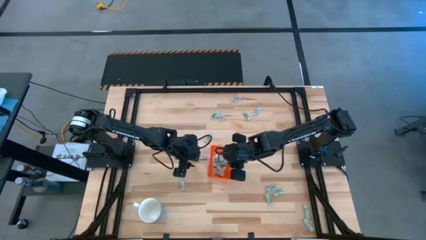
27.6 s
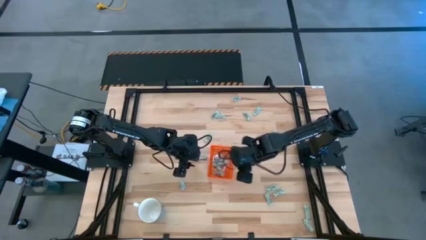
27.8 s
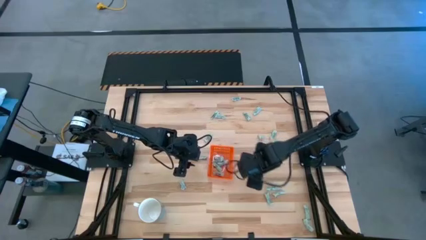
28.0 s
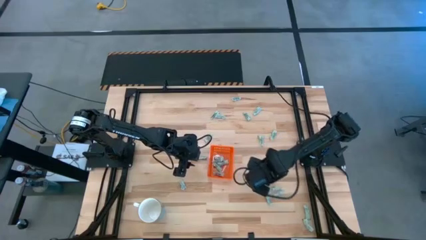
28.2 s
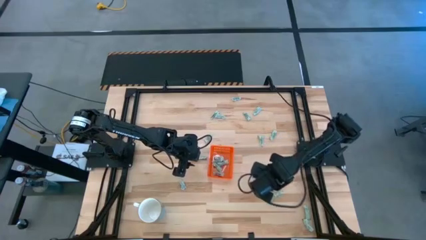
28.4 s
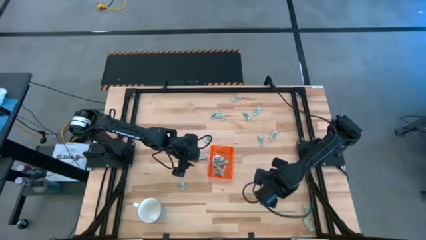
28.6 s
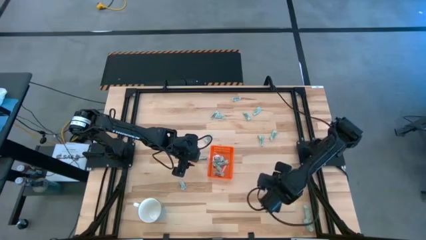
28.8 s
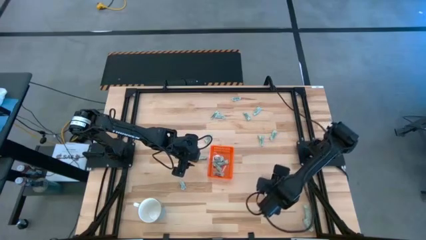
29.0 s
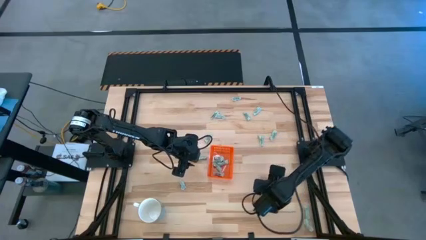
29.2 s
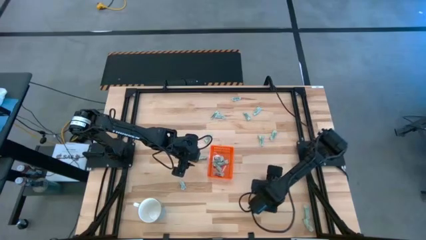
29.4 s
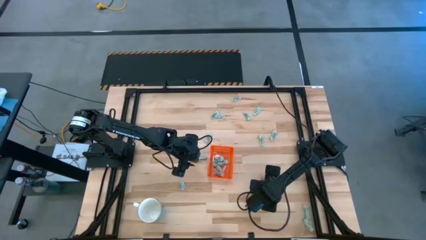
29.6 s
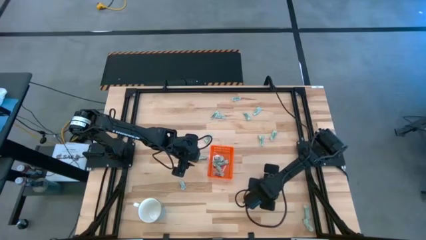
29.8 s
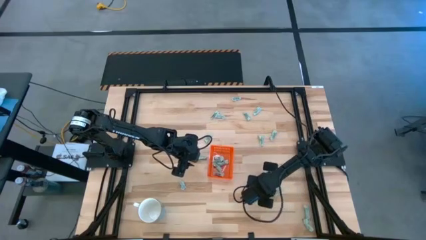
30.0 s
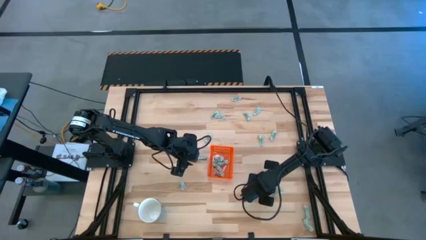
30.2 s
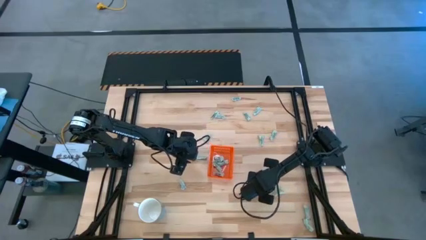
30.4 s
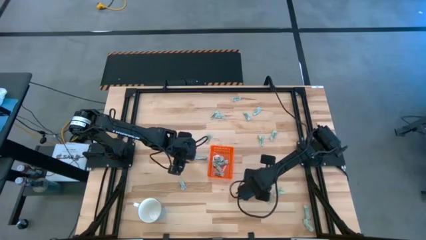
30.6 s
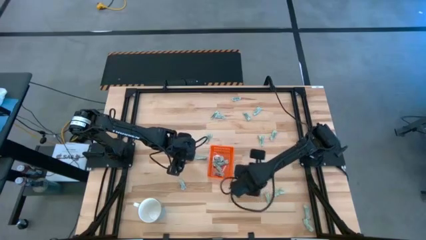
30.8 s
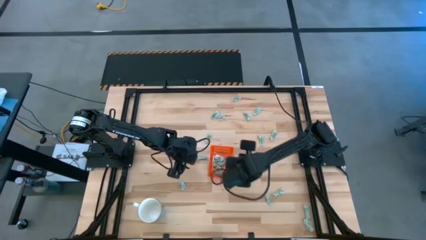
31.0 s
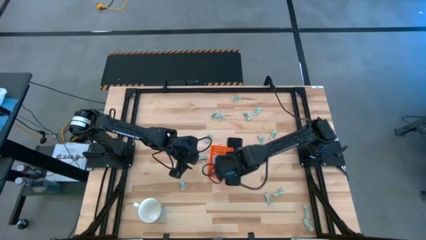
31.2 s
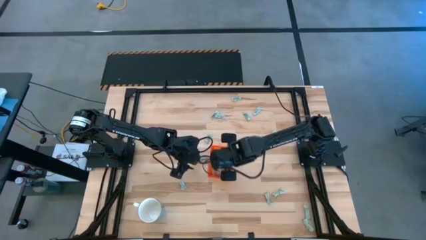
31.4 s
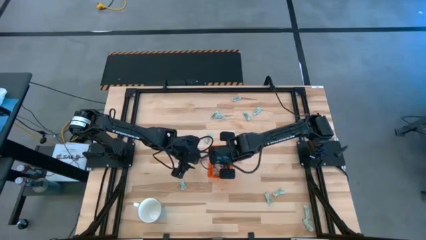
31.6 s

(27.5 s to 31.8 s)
Task: Pick and place Stevia / Truvia into bins
Put the stevia packet into the orange bin

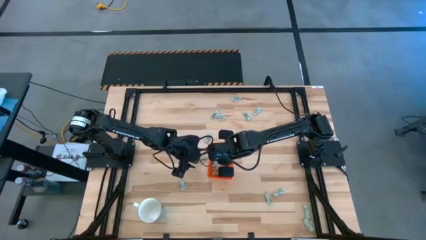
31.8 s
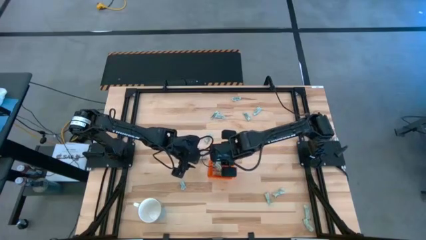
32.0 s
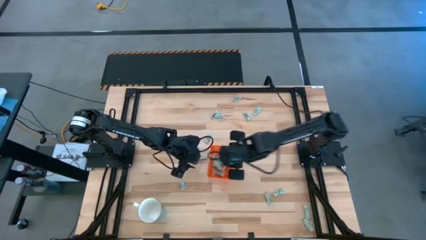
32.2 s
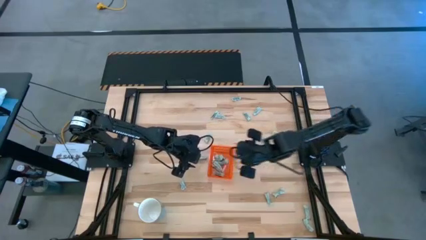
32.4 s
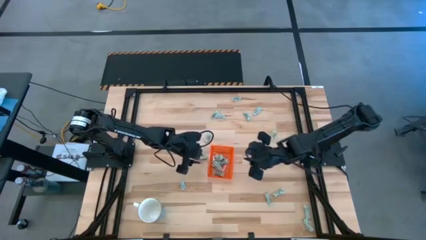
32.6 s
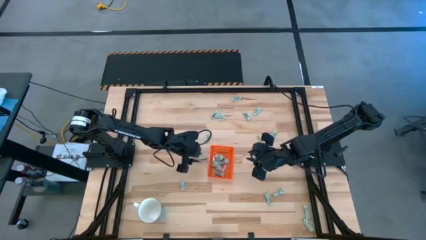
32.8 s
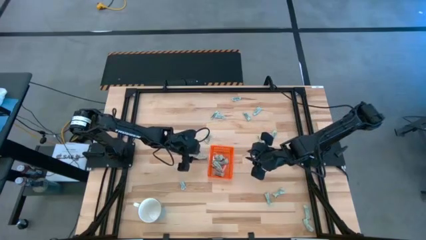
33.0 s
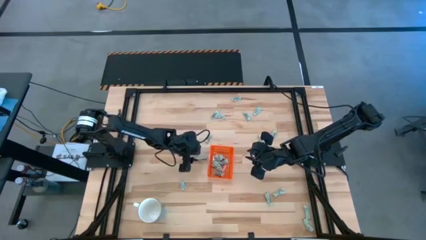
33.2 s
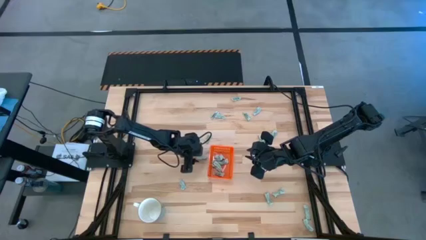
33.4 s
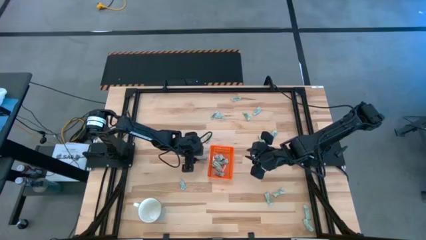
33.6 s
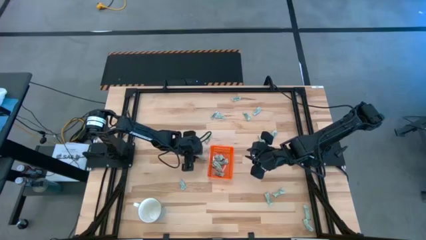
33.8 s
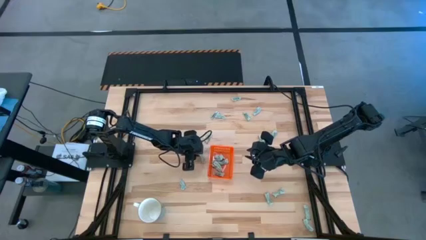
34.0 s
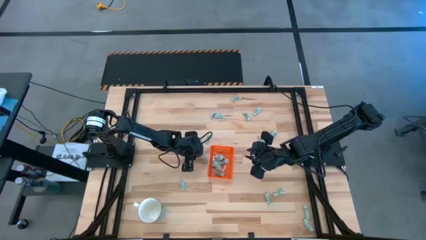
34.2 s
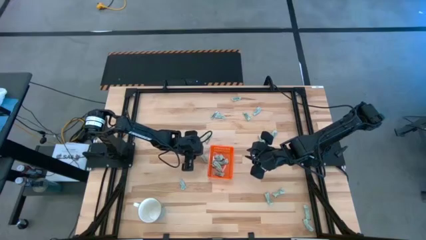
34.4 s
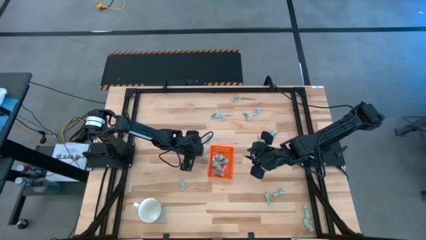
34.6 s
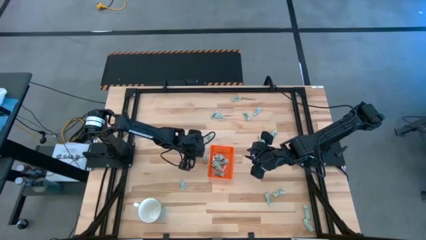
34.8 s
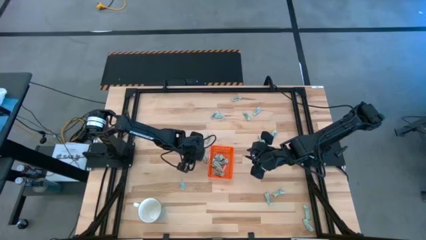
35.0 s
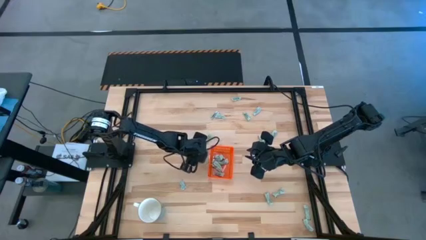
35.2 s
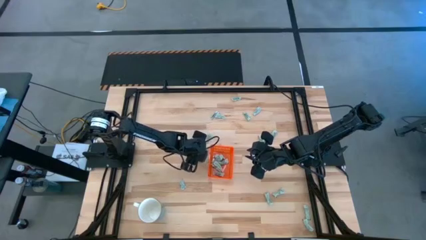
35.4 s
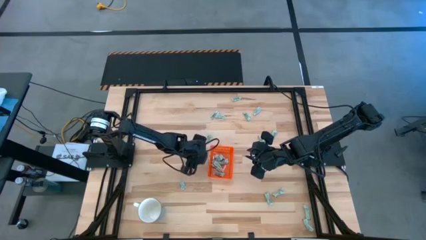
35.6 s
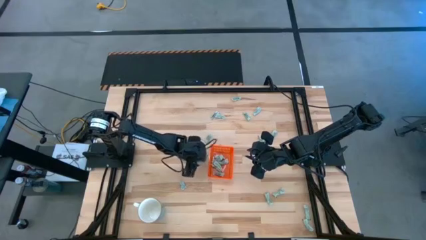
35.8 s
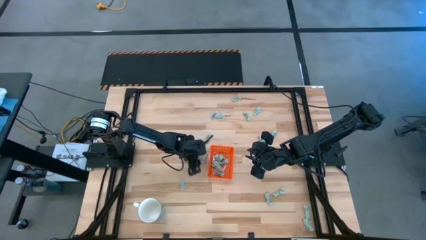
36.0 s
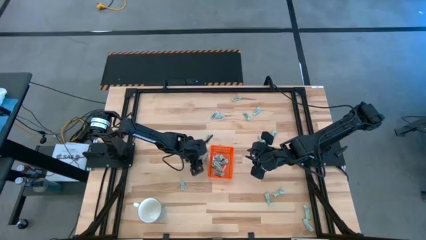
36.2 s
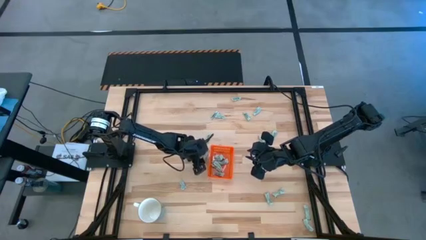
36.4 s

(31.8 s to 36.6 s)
Put the stevia packet into the orange bin

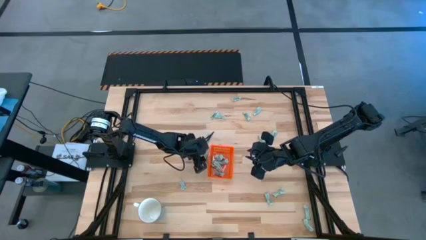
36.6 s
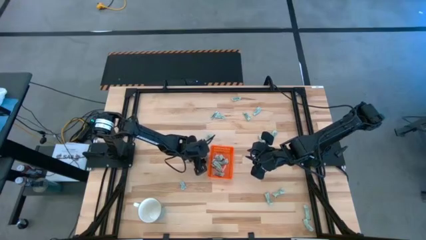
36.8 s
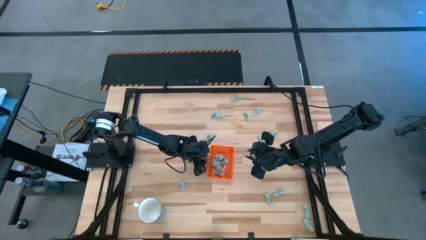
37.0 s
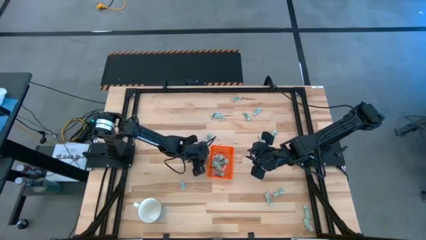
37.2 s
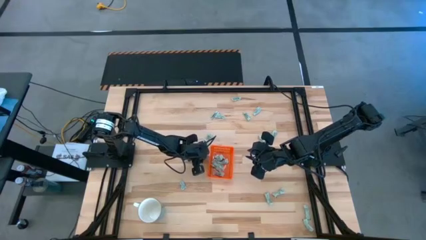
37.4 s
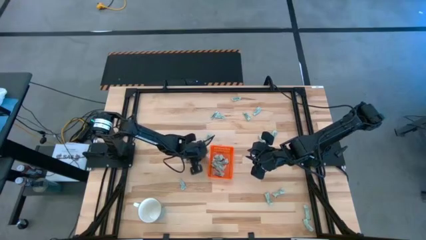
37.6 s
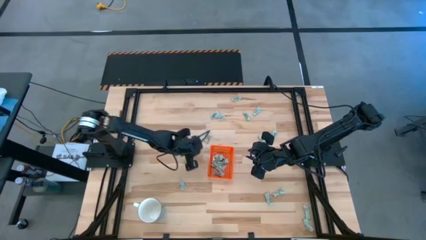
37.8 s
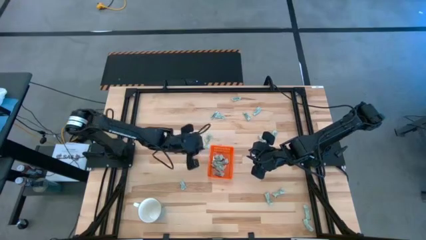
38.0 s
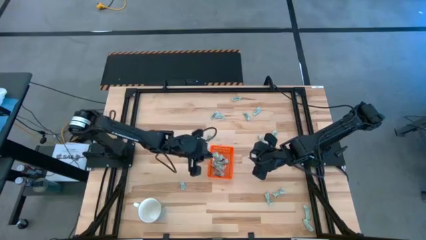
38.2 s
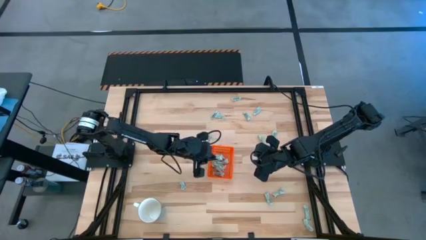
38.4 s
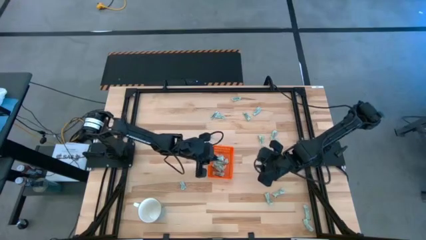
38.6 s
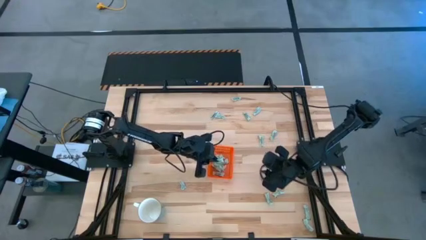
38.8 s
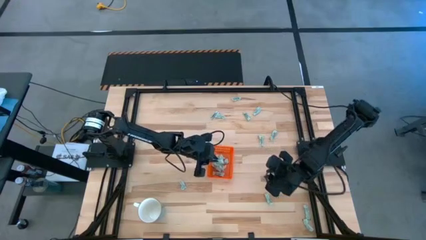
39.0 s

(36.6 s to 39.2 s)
Put the stevia packet into the orange bin

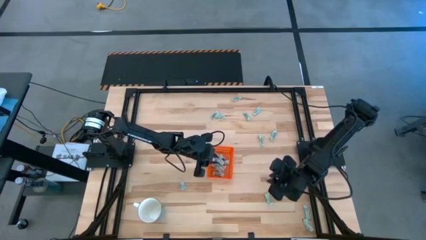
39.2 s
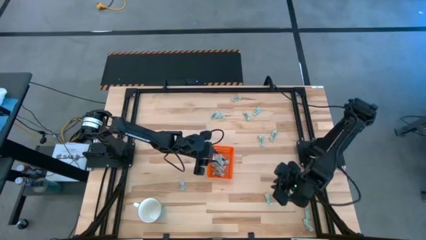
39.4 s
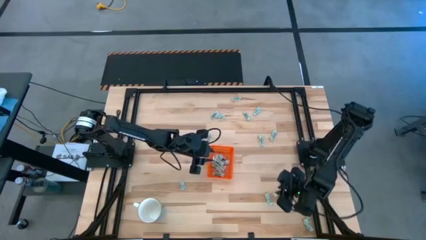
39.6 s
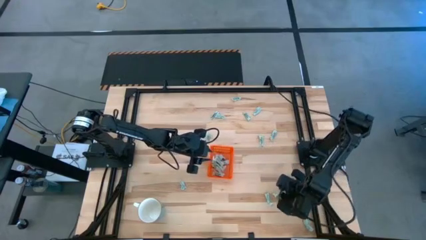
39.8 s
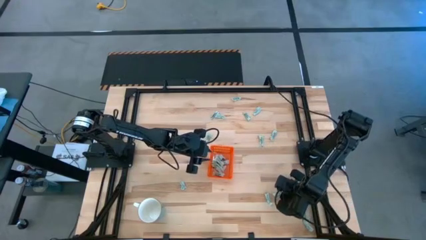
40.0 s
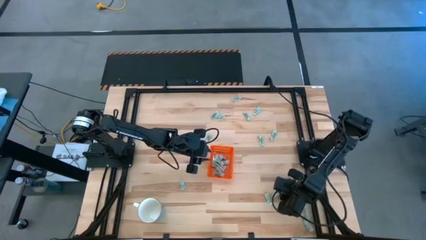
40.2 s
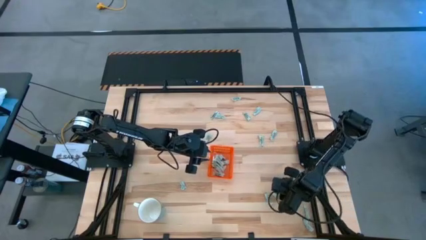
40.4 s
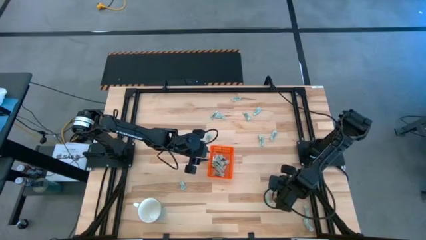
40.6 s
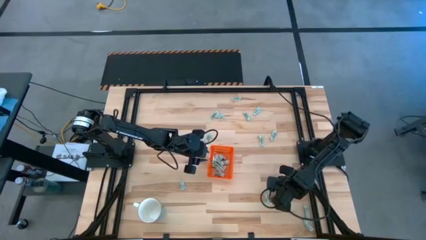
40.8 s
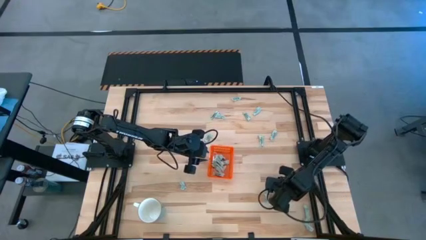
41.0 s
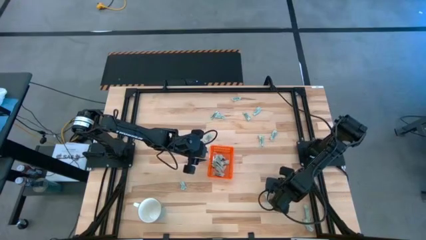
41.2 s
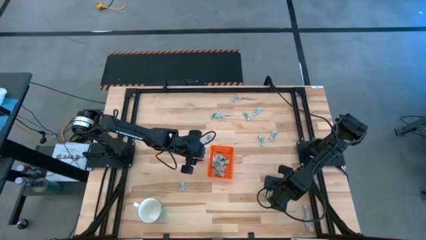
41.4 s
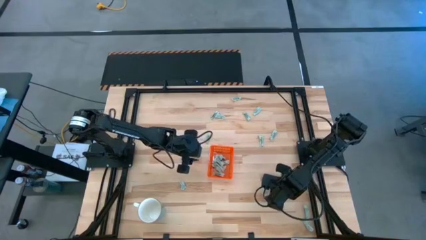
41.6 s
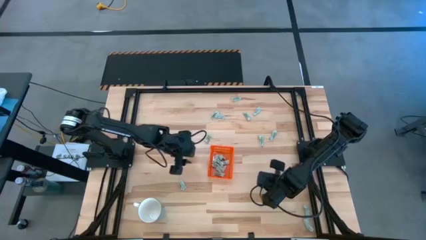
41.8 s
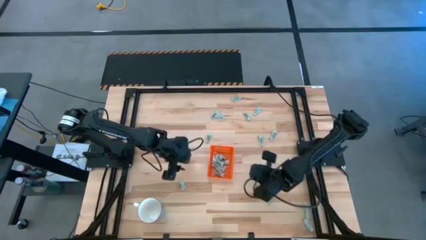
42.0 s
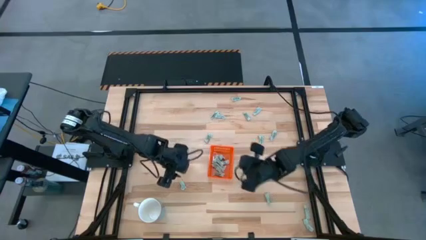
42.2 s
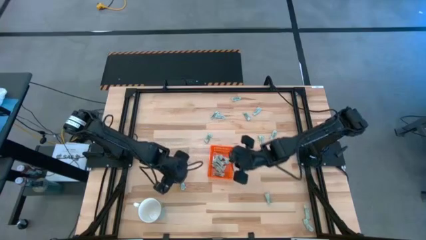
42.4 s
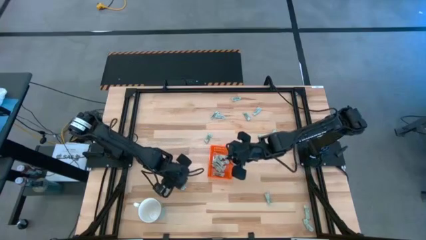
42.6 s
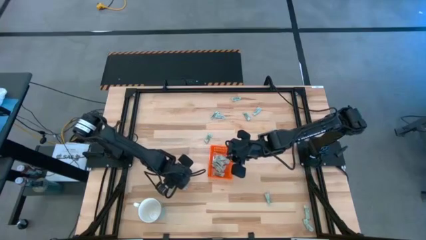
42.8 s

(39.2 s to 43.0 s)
Put the stevia packet into the orange bin

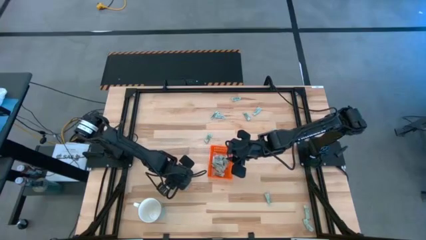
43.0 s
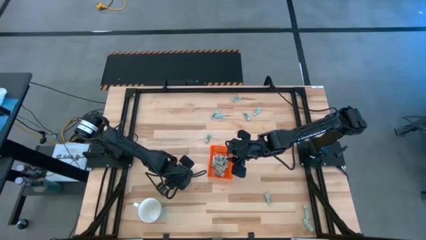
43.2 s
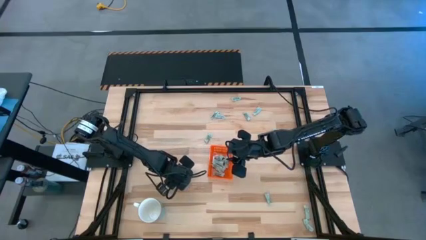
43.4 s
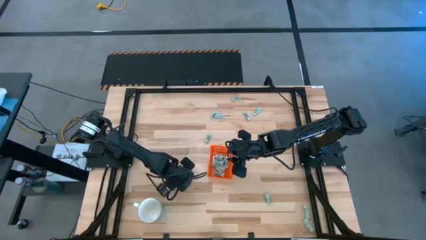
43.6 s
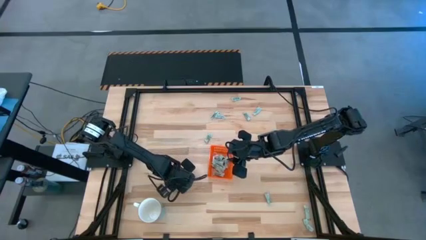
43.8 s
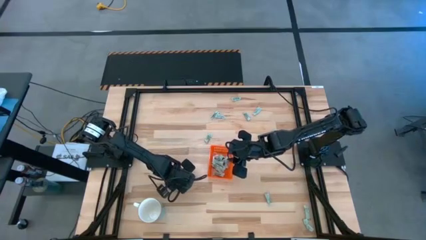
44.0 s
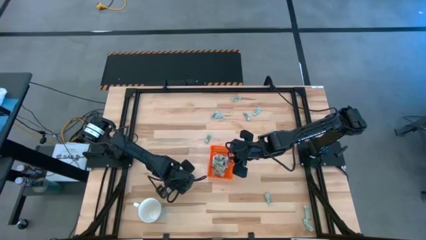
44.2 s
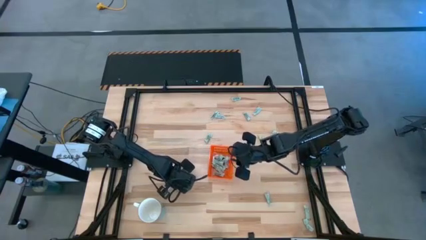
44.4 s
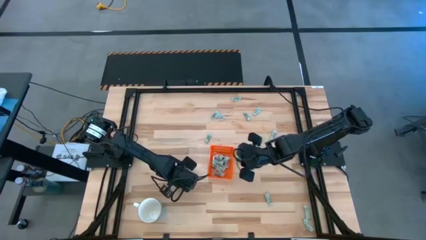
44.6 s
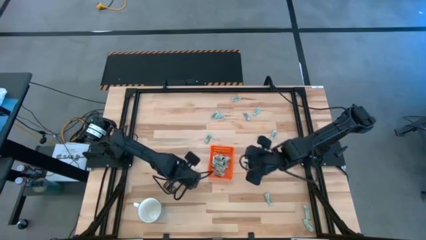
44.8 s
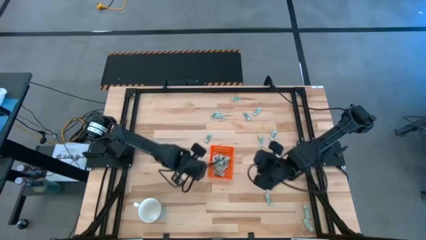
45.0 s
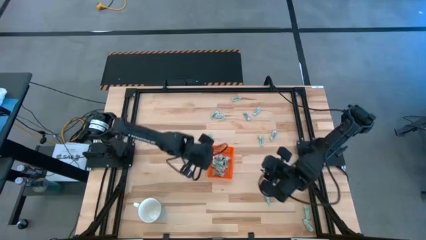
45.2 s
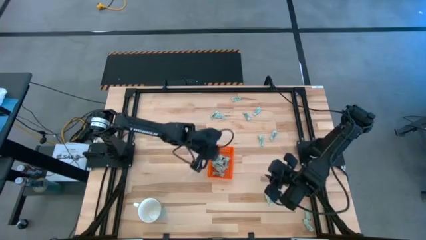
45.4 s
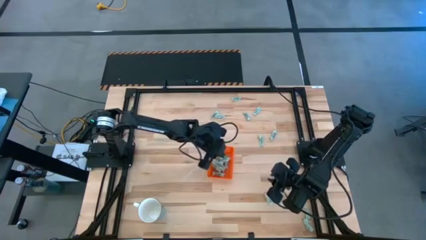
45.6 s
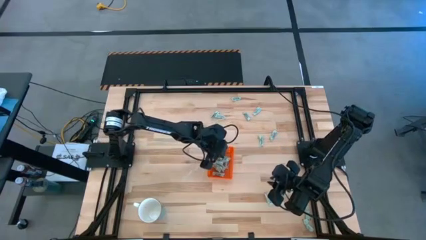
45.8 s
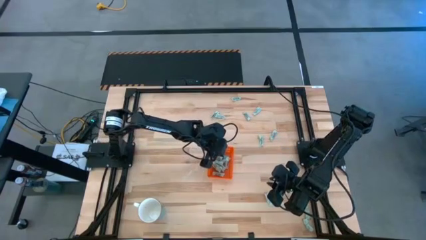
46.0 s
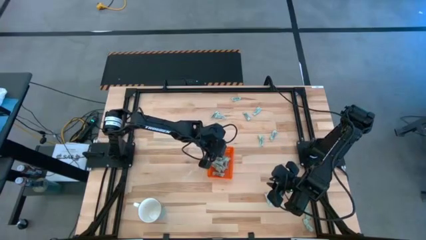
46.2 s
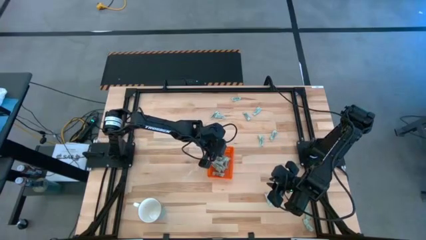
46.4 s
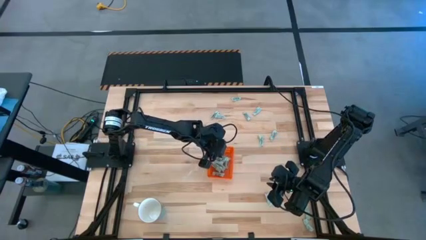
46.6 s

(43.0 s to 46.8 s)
Put the stevia packet into the orange bin
